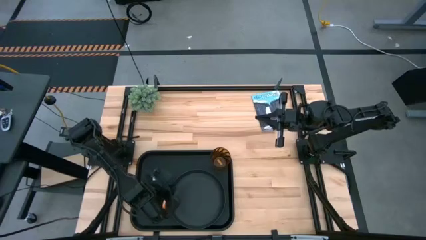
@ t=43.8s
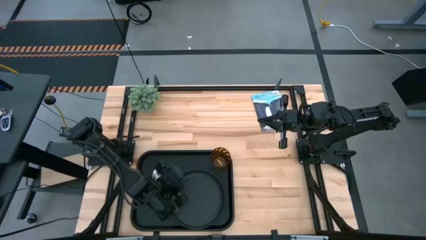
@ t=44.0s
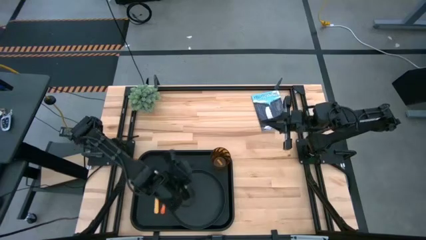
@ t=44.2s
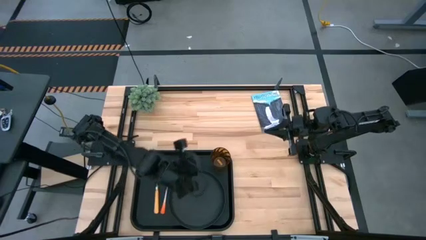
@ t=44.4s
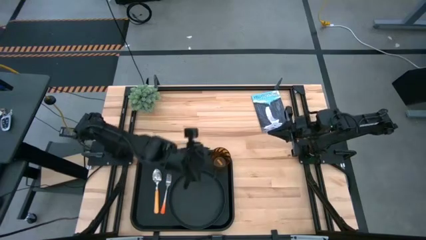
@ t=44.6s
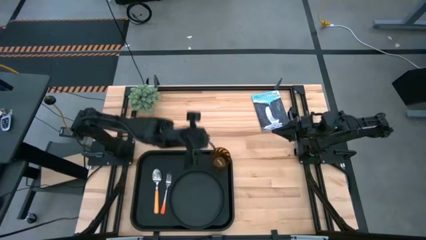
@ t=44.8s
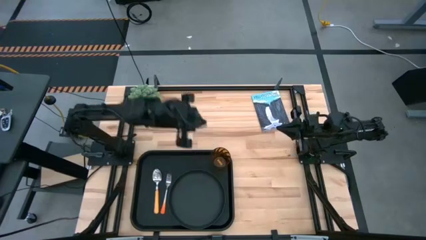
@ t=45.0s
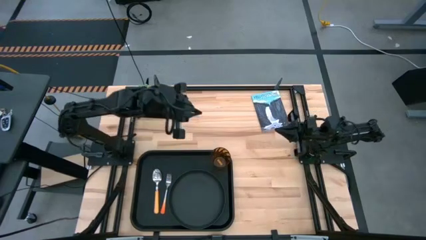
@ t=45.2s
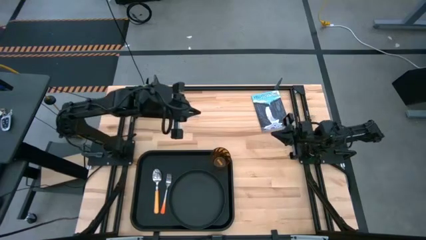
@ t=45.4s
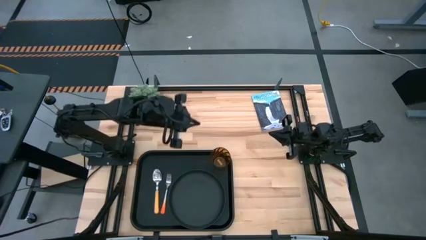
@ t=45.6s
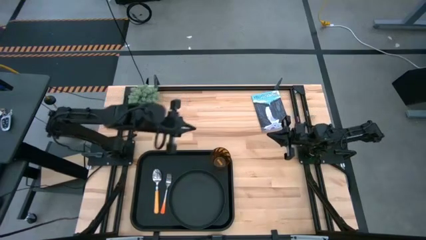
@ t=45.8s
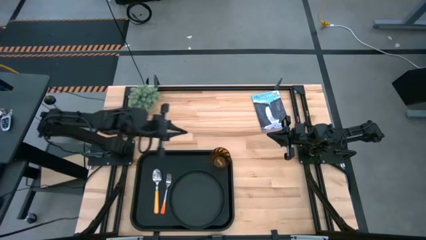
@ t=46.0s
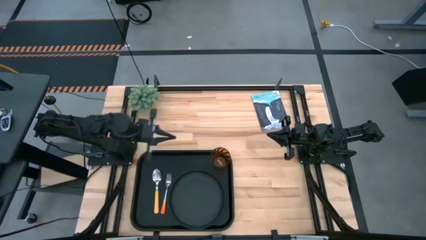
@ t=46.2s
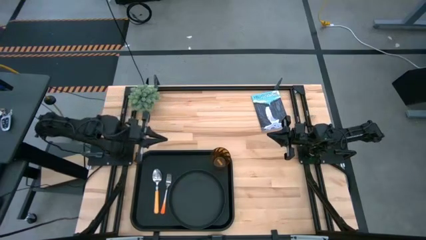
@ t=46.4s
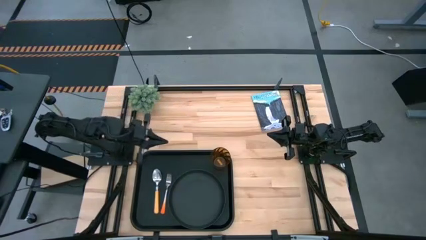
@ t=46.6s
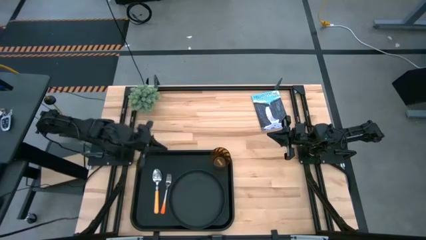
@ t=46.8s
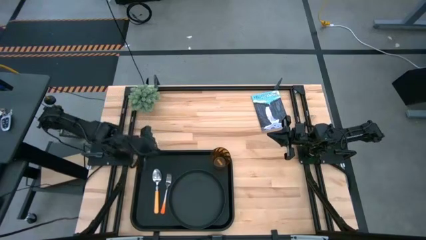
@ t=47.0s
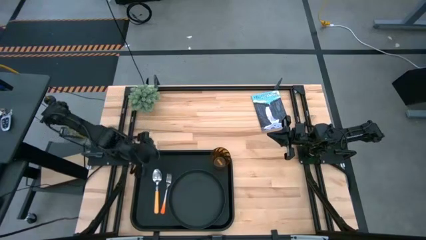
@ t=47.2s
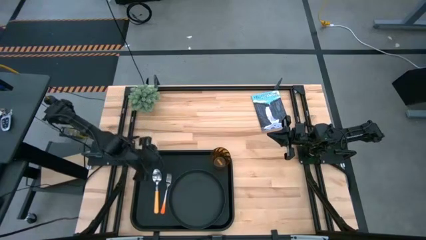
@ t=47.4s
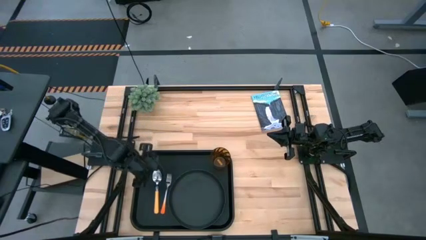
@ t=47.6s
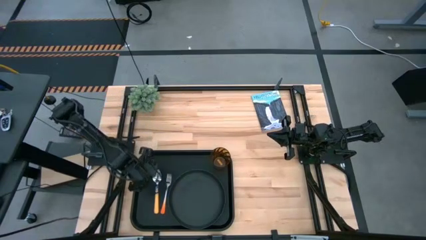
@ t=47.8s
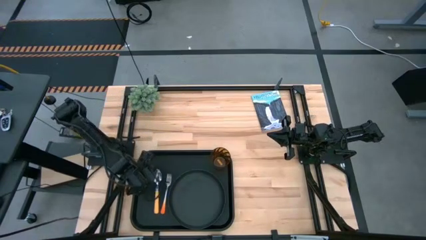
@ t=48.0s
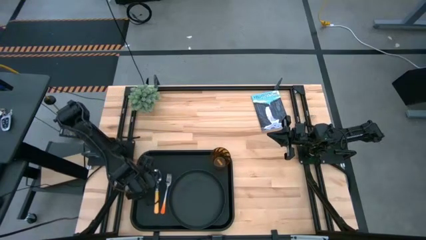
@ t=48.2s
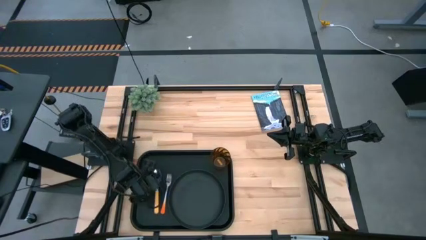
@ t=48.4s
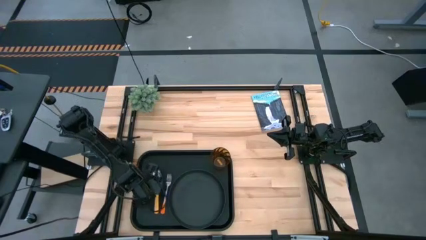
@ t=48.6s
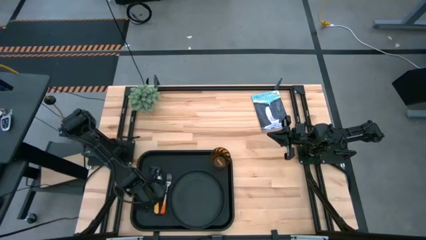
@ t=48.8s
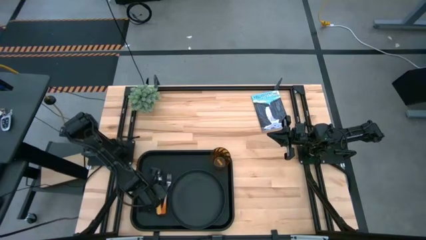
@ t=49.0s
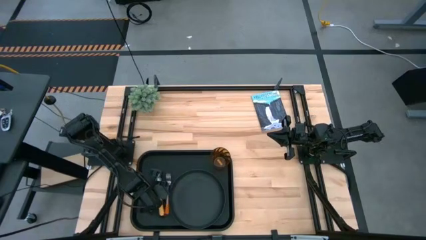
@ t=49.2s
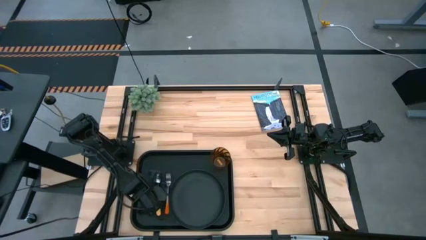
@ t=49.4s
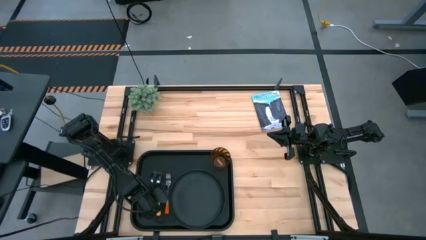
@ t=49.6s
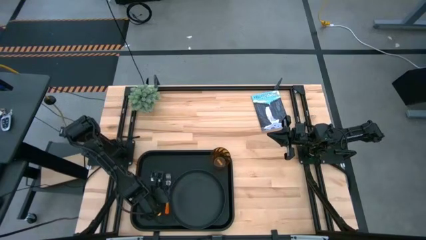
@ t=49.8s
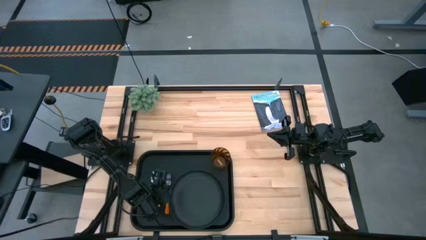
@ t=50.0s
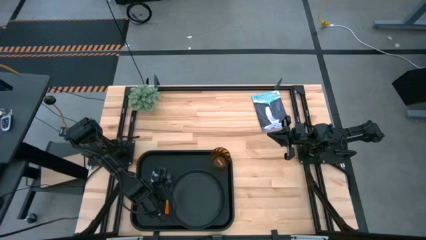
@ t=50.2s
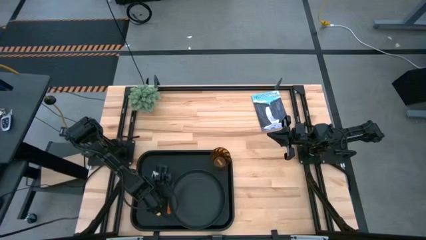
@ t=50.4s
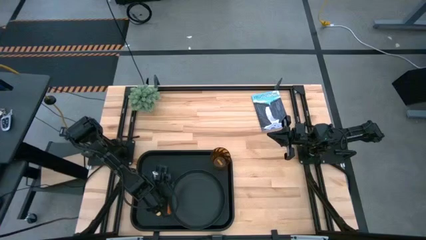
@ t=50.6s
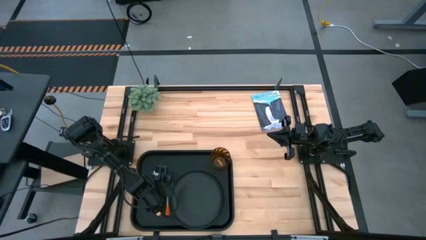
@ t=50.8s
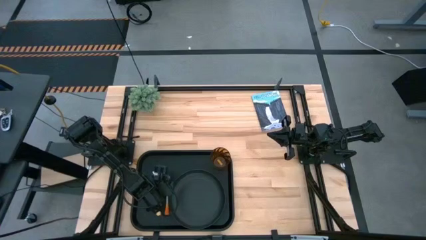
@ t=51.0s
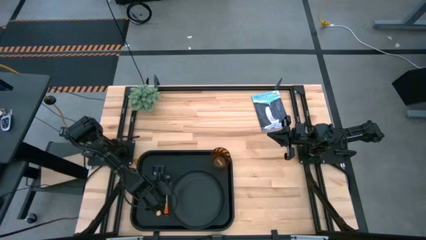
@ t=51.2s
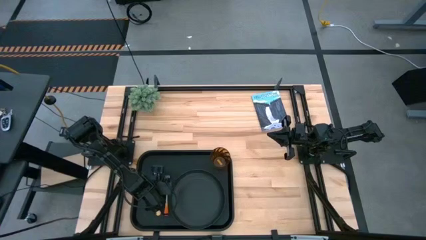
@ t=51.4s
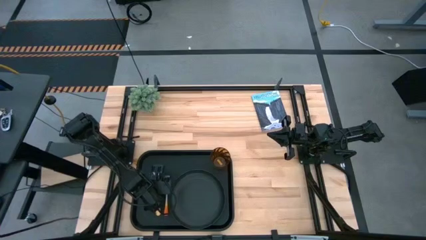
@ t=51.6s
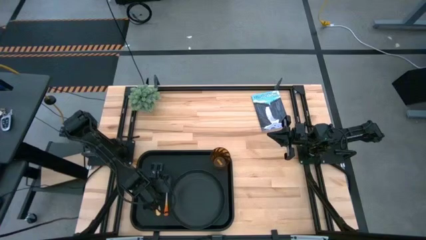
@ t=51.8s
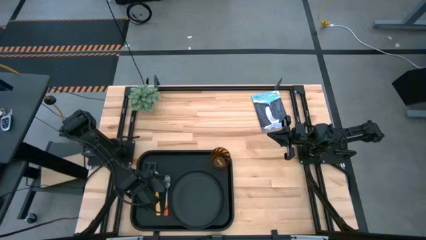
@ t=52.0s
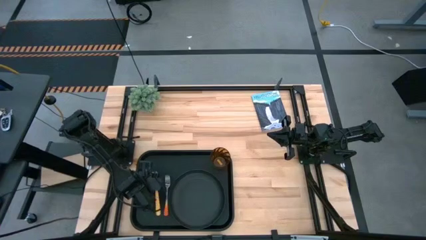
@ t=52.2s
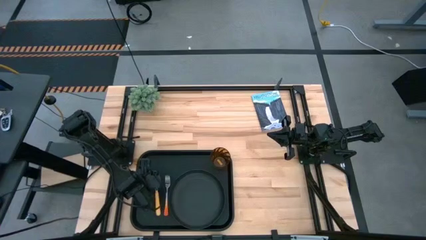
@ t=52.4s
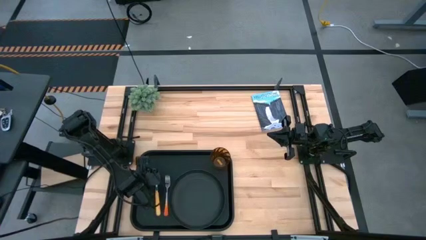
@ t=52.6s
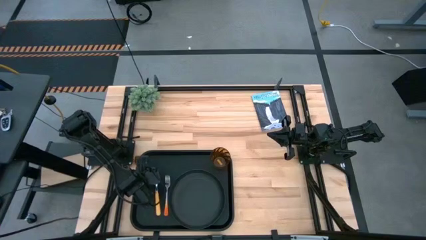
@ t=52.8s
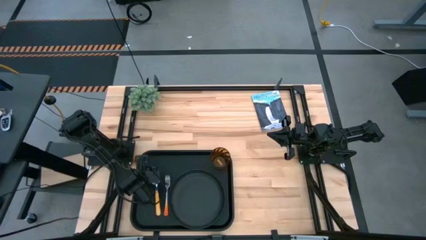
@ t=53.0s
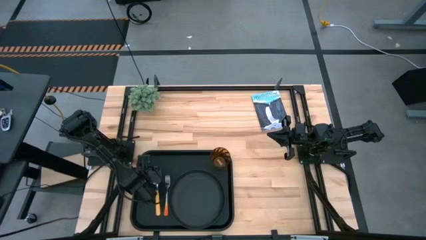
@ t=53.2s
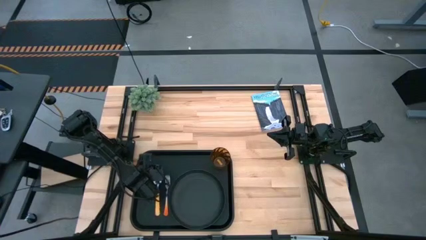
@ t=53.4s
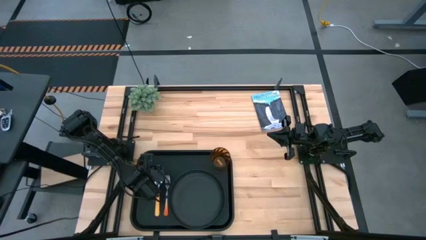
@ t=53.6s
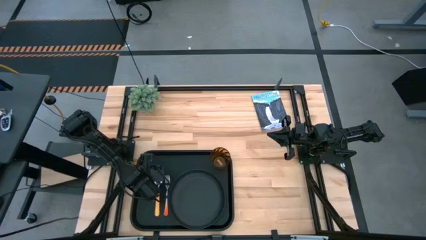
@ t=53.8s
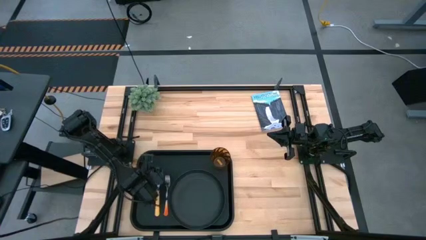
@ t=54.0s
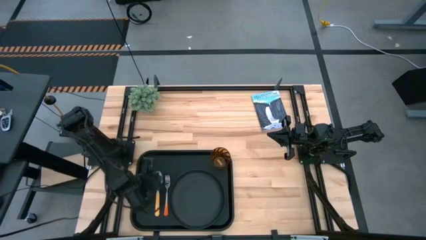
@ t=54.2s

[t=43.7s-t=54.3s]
Task: Pick and place plate/cup/fork/spoon on tray
Adjust the utensils on the black tray

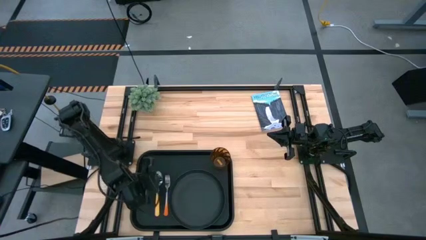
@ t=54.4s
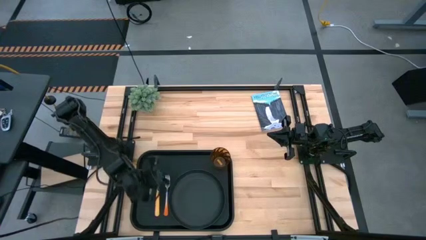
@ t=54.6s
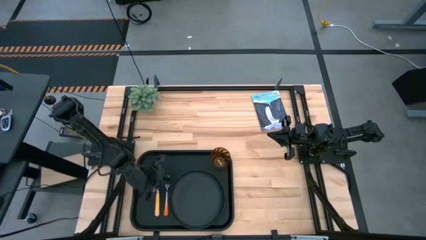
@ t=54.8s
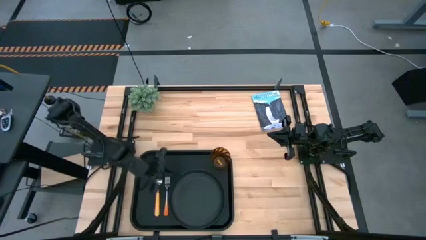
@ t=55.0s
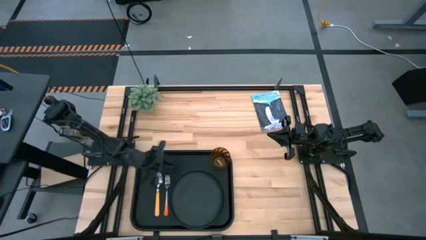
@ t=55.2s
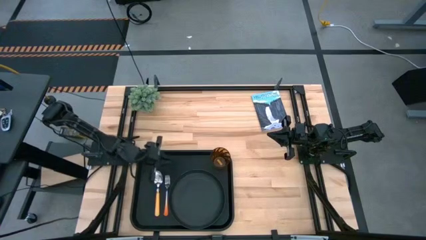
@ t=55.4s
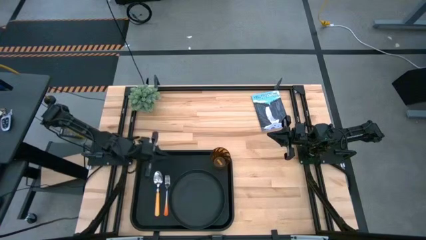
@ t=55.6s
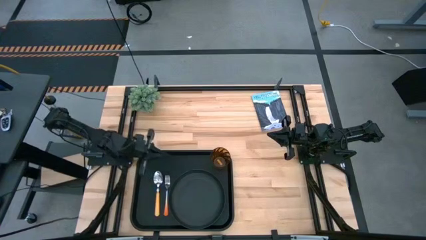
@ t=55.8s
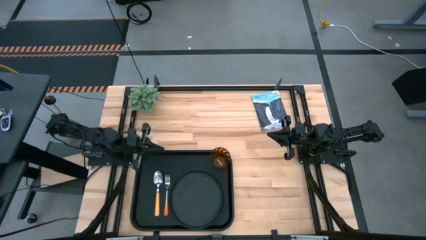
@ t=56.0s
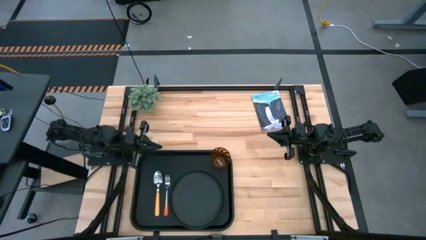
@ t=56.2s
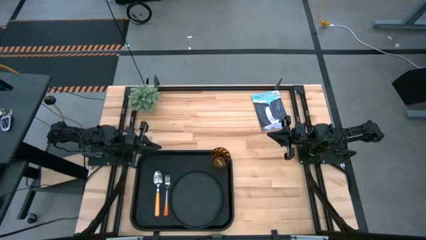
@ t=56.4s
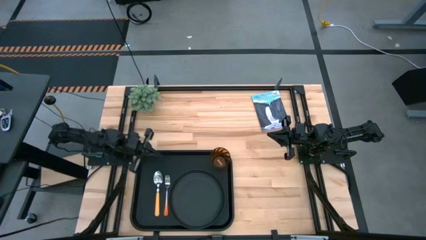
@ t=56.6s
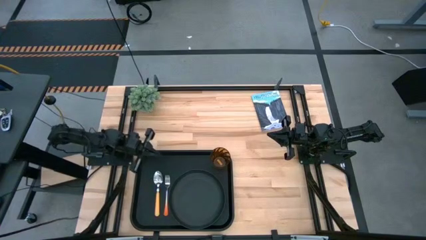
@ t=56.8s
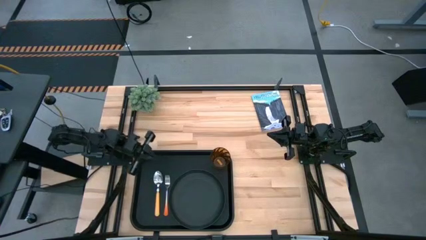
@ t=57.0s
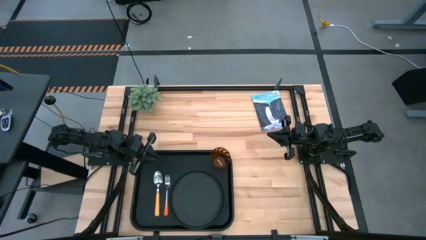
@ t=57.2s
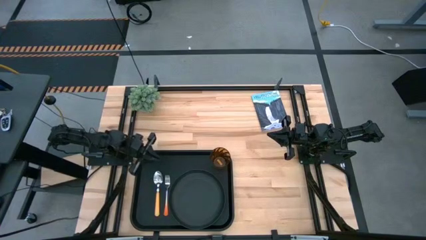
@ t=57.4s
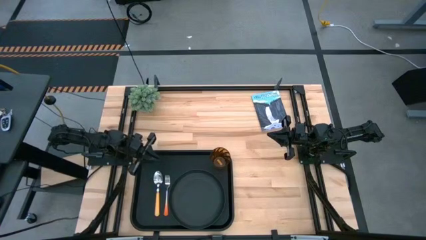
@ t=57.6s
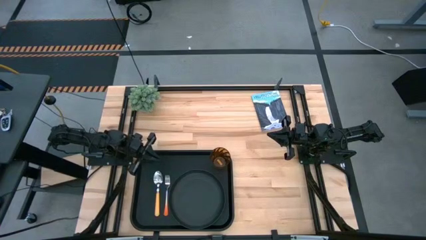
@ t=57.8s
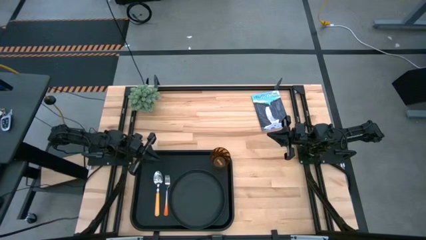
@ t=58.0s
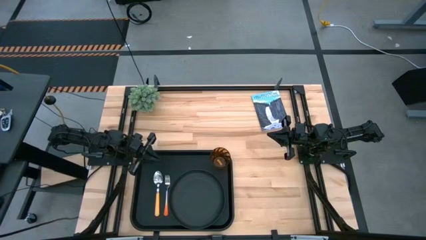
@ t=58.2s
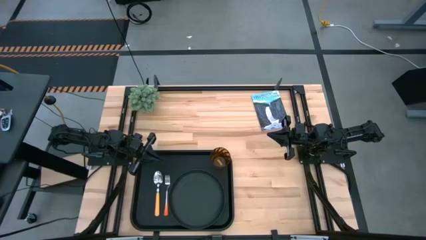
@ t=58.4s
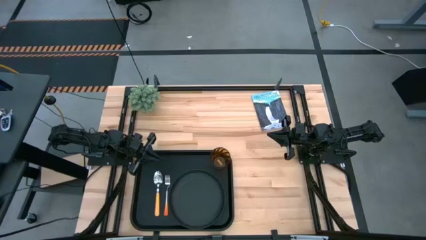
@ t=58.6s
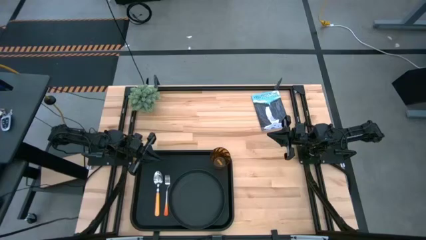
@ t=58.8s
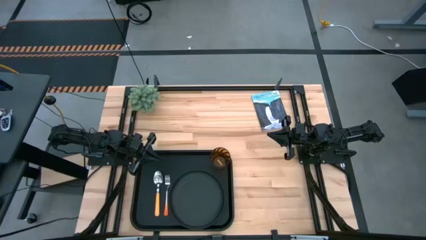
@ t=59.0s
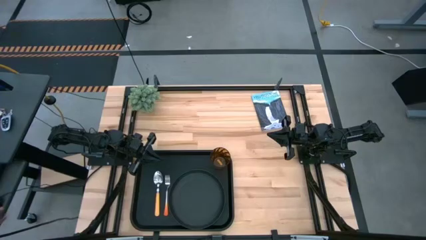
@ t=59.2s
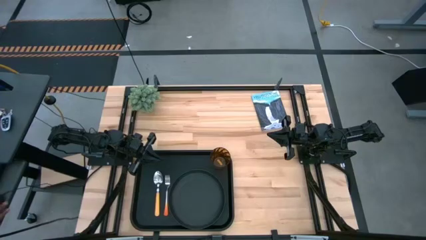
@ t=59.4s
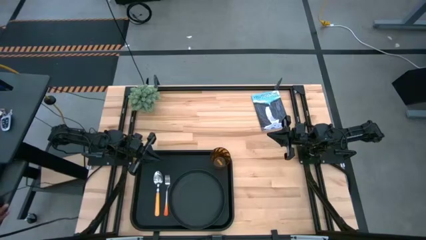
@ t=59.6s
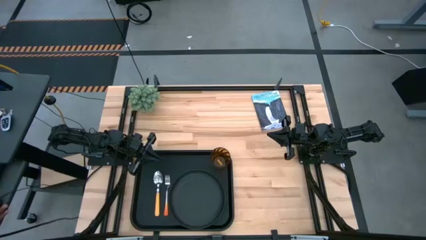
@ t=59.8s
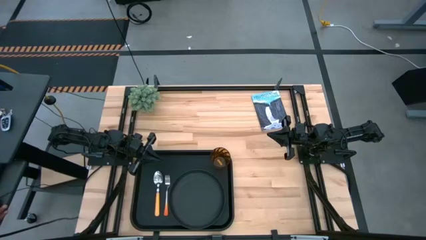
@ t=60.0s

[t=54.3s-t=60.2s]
Return to Home Position

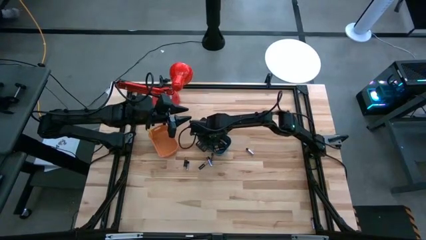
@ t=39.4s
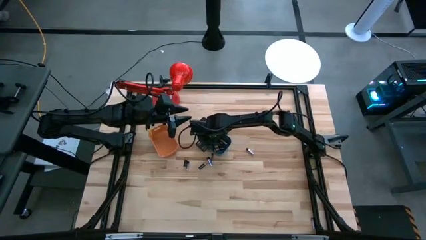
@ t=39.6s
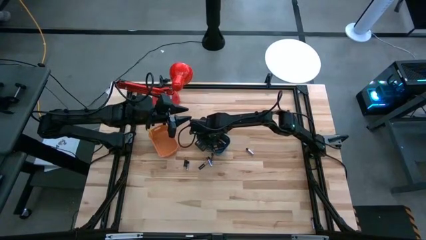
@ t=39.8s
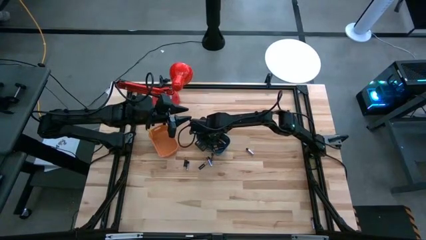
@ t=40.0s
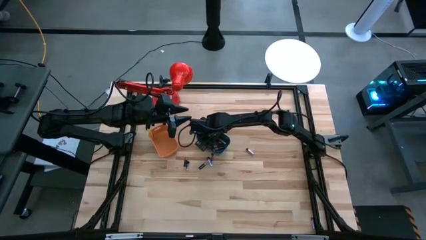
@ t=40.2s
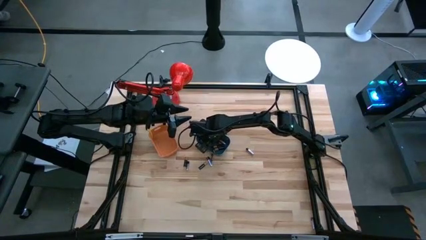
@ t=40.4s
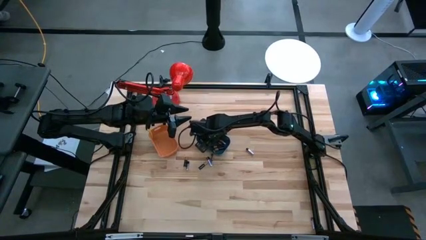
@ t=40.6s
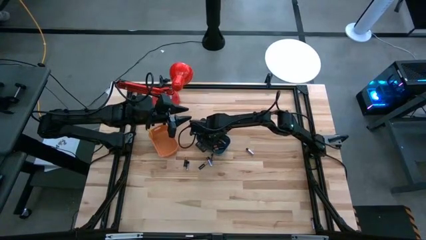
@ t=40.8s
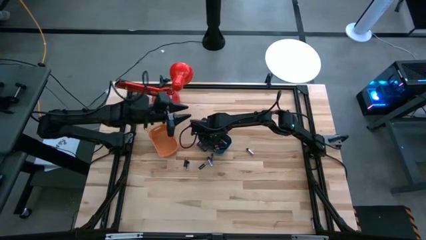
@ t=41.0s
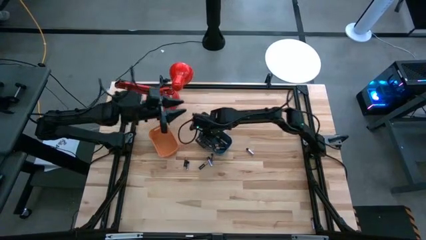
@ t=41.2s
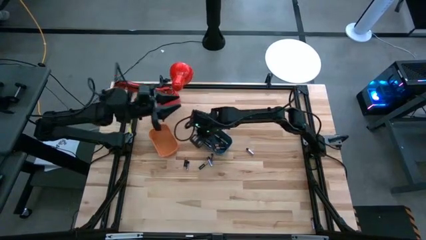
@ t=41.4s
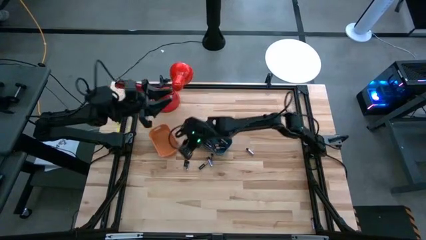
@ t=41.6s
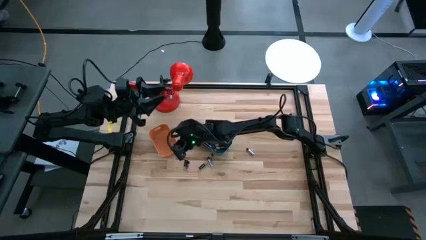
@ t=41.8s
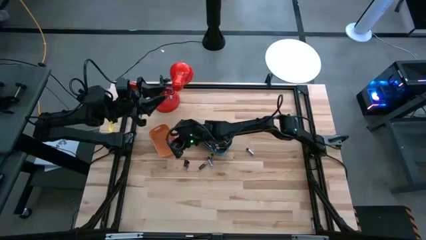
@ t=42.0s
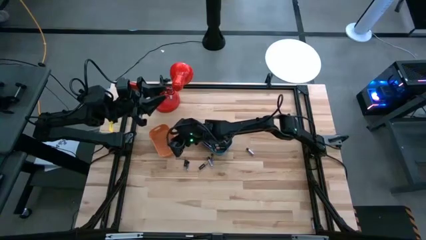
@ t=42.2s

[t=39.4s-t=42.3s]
Task: Sort batteries
Put the silver battery from the blue bin into the orange bin
